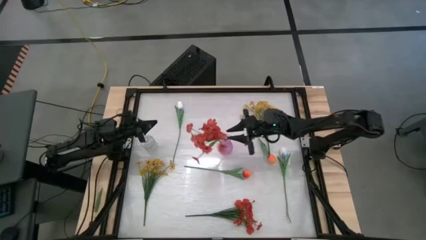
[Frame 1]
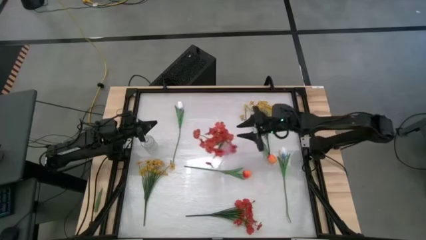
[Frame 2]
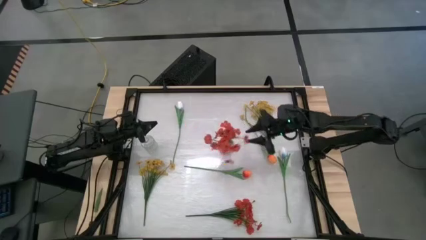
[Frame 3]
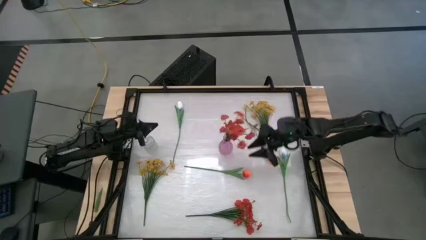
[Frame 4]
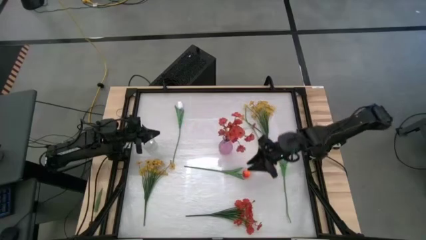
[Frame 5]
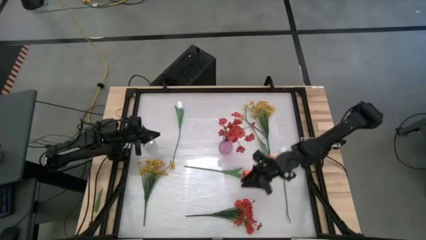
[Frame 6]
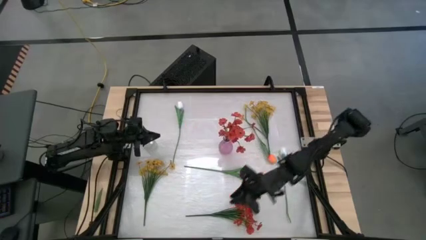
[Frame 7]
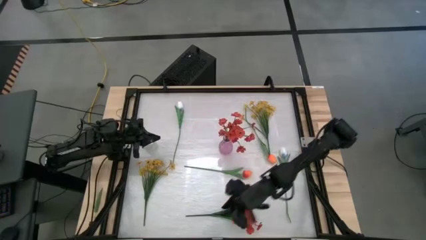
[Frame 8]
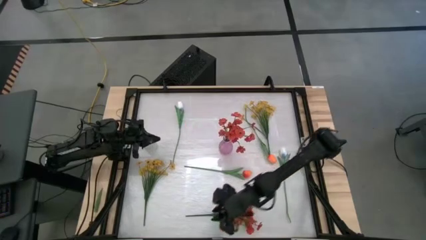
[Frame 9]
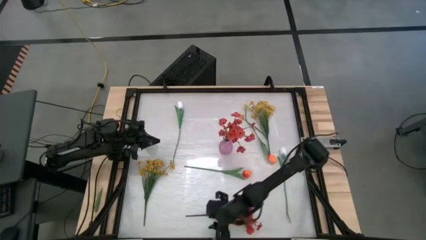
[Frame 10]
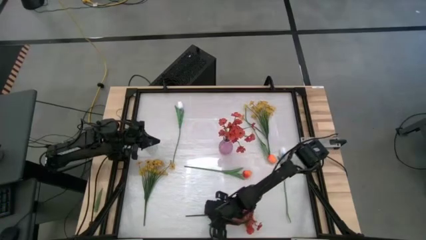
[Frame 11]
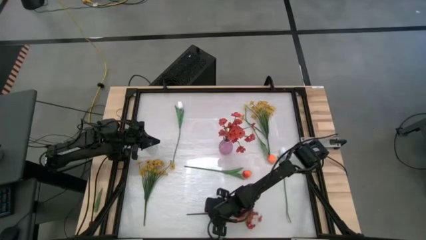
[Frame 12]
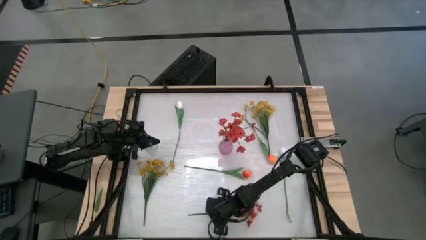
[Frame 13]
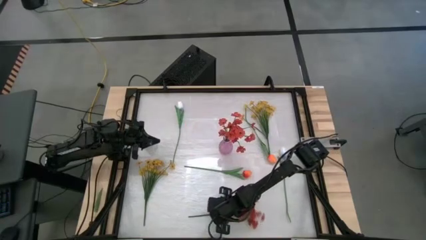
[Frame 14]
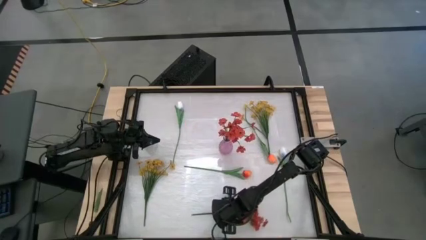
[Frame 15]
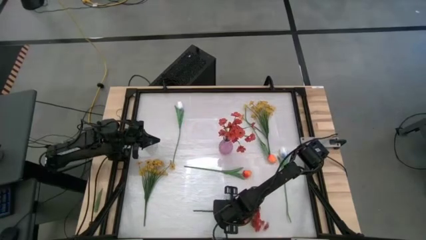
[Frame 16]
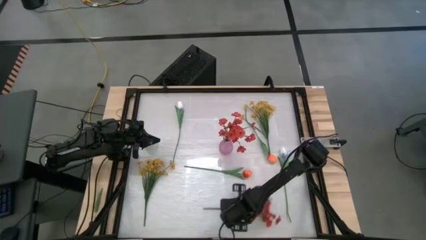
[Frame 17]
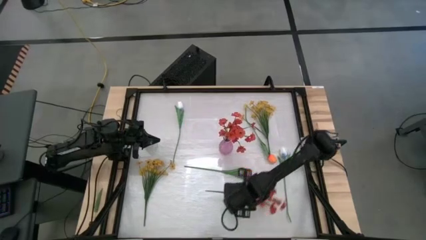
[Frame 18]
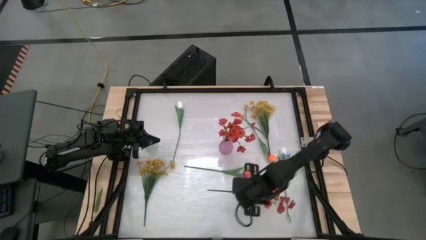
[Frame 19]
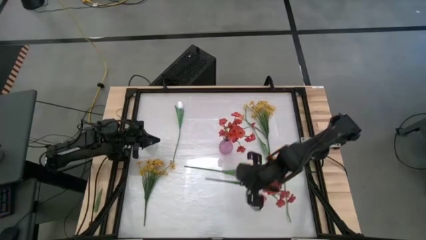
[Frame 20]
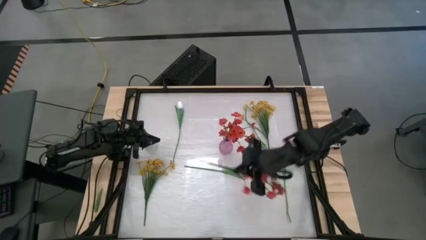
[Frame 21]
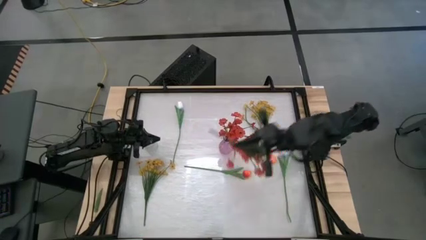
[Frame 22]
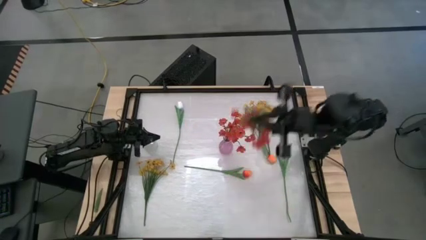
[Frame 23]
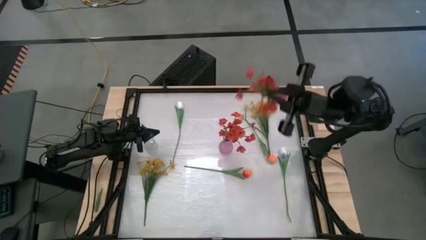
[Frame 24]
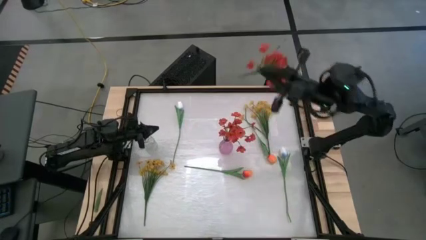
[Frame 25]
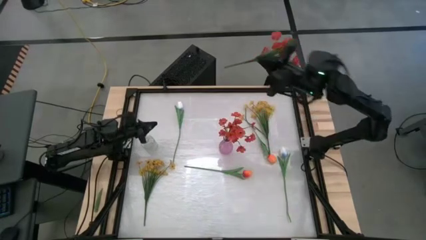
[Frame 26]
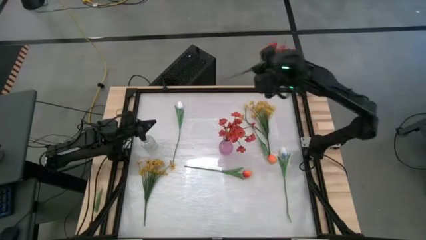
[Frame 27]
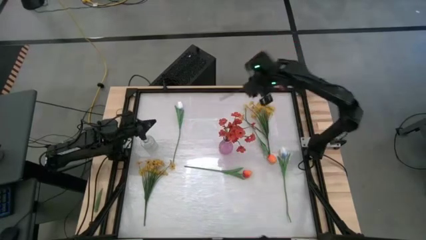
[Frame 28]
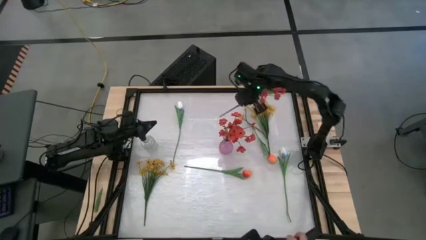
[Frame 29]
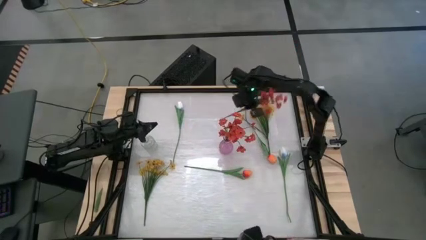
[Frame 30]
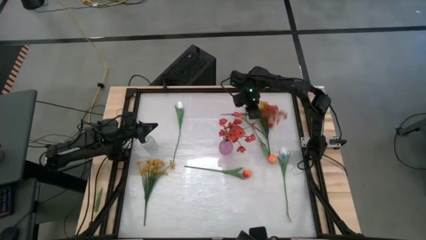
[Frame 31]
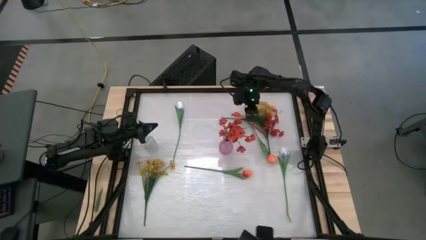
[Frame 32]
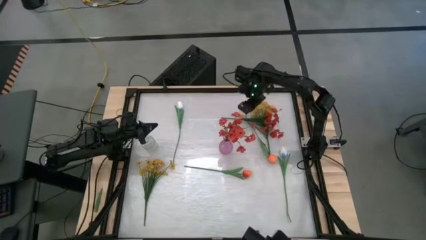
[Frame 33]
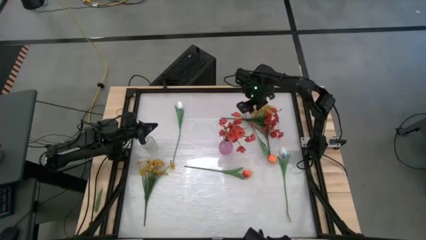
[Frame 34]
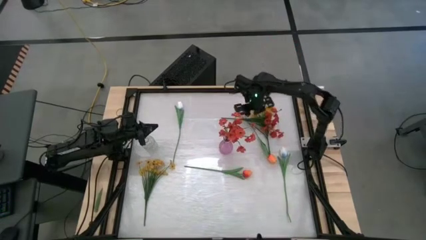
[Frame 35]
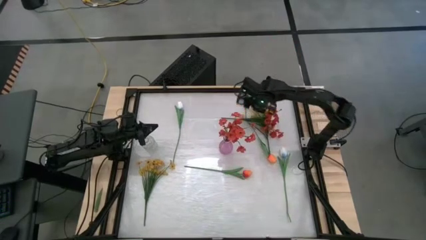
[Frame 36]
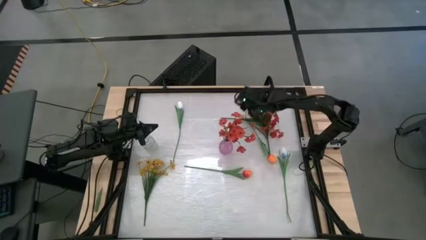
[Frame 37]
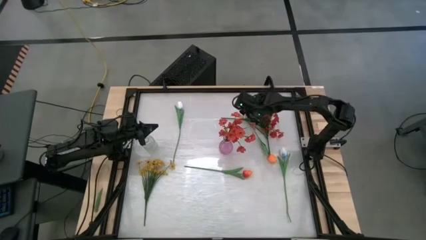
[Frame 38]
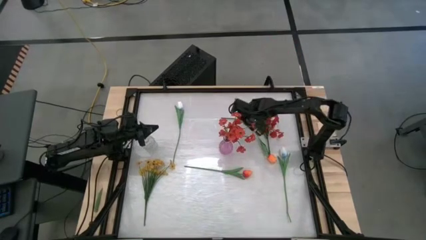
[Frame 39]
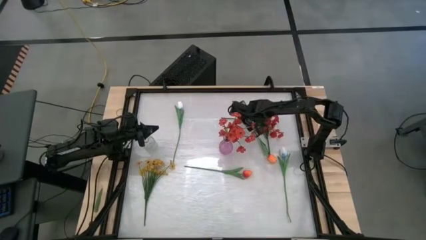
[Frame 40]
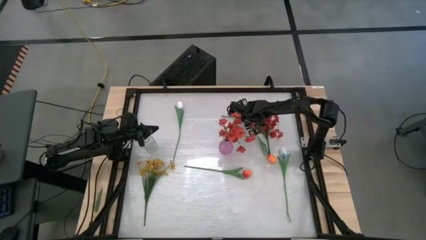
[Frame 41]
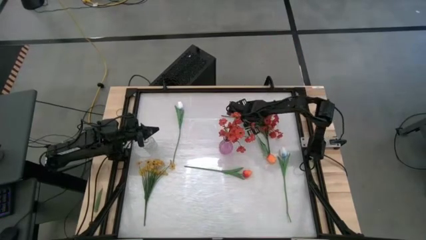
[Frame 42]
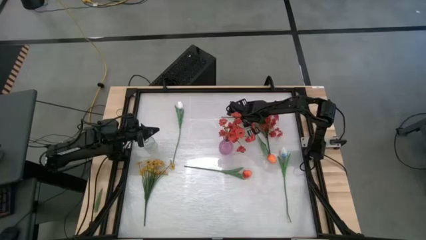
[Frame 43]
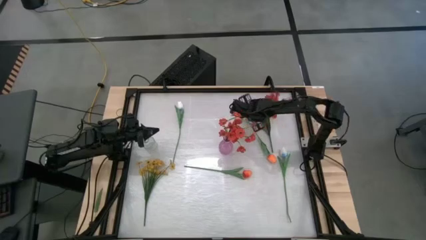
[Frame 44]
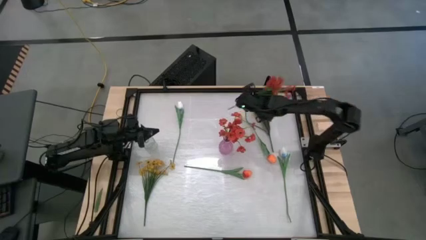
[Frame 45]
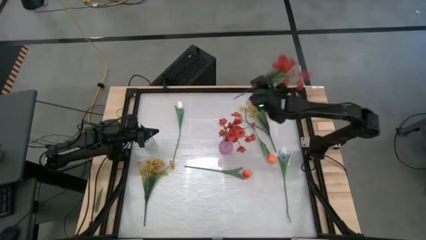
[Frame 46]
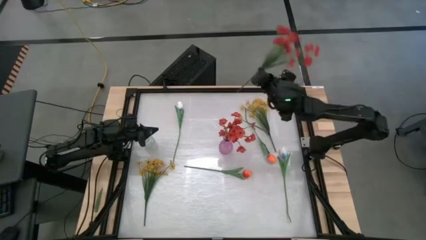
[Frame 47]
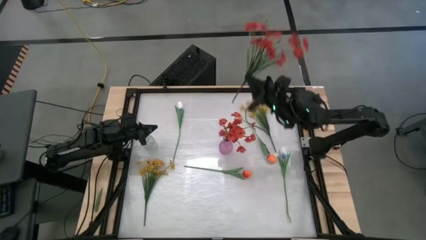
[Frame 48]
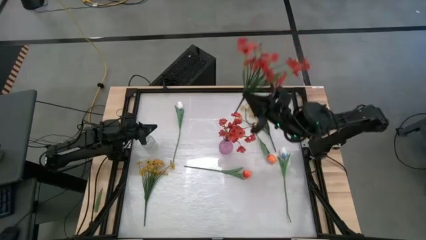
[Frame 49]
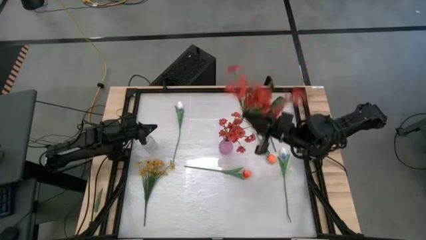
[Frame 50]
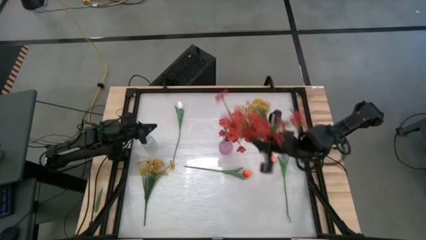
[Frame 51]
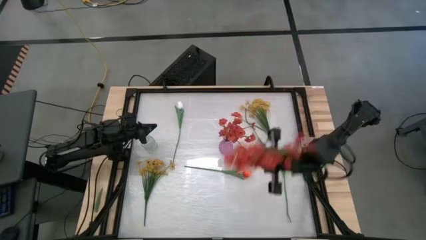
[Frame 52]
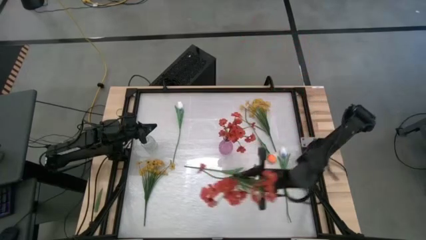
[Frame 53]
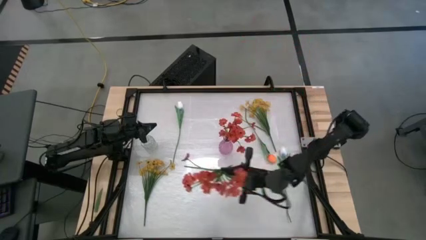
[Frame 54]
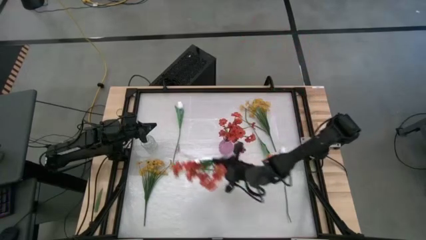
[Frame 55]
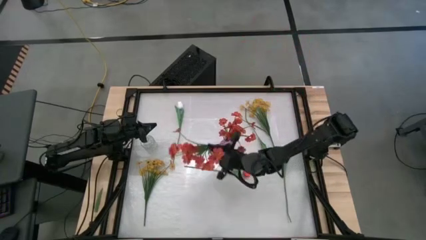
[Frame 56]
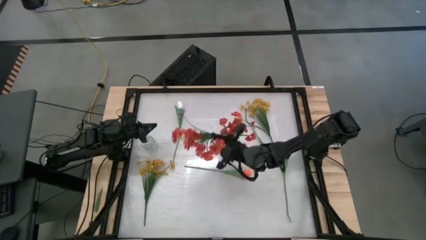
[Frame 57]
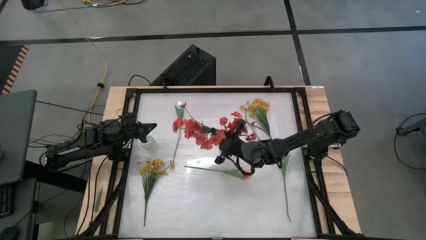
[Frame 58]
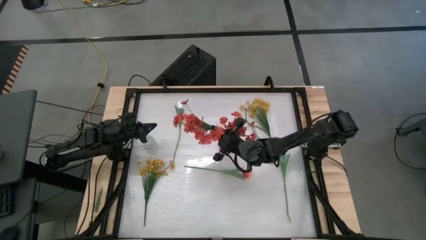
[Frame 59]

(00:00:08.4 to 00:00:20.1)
Task: Sort flowers into vase by color
Put the orange flowers into the violet vase
